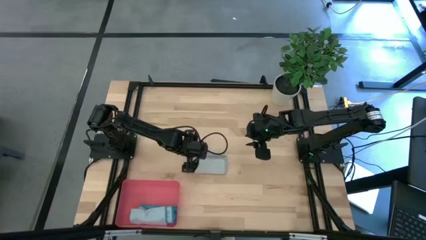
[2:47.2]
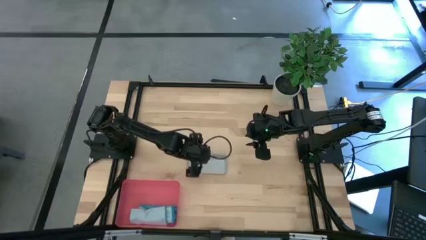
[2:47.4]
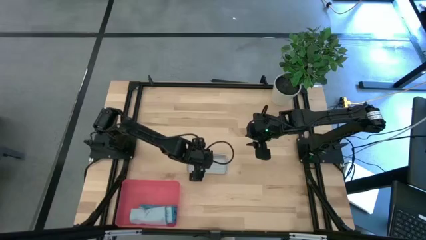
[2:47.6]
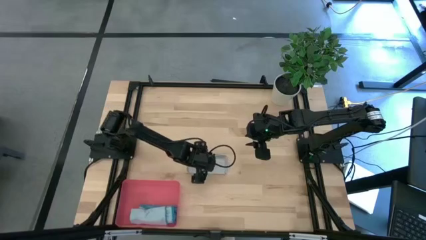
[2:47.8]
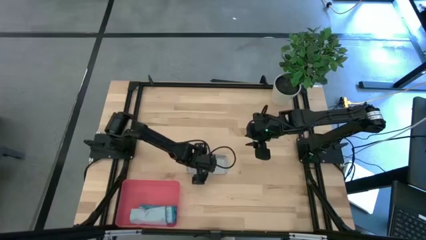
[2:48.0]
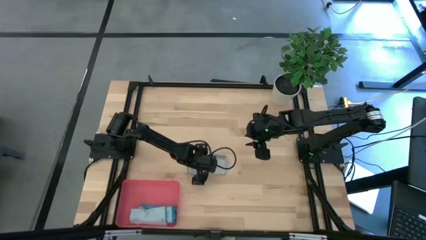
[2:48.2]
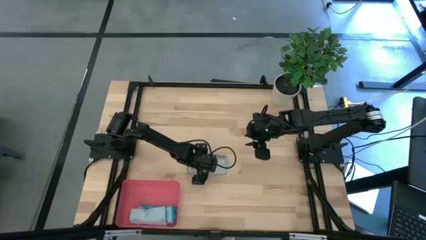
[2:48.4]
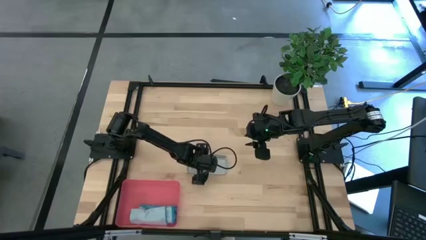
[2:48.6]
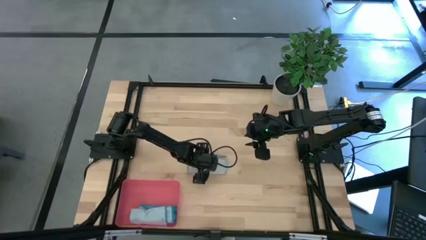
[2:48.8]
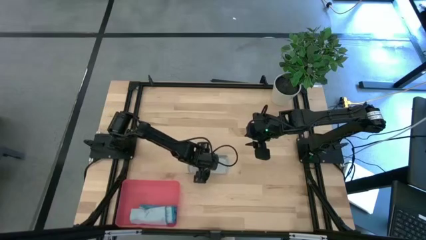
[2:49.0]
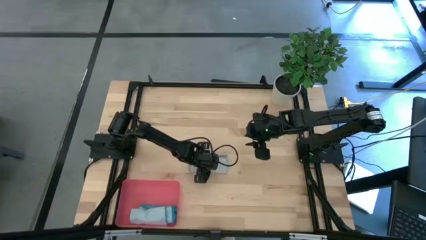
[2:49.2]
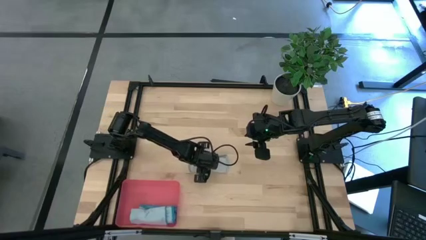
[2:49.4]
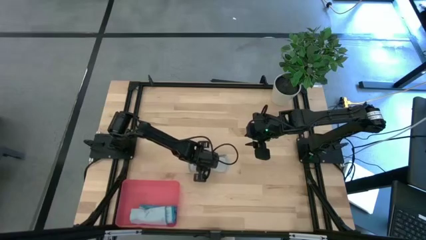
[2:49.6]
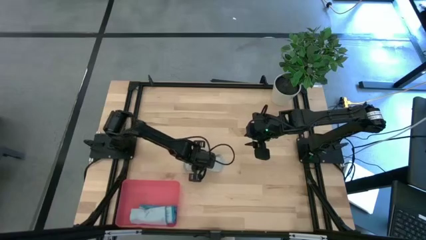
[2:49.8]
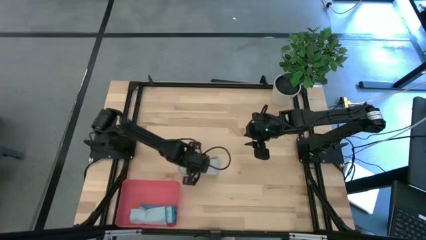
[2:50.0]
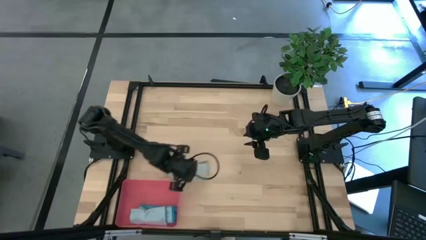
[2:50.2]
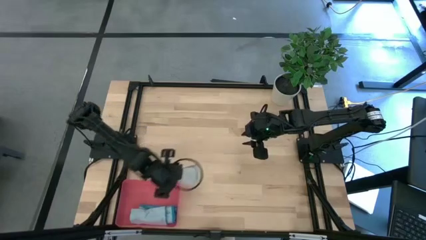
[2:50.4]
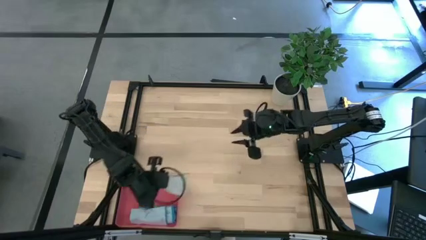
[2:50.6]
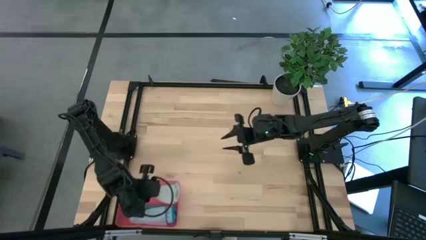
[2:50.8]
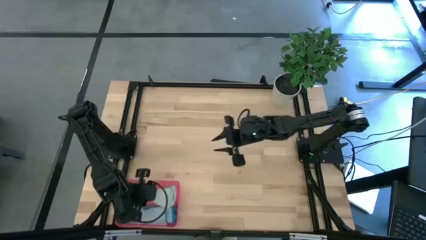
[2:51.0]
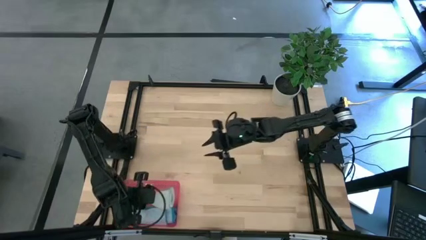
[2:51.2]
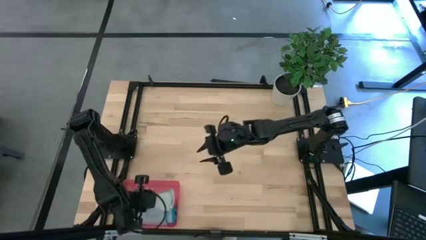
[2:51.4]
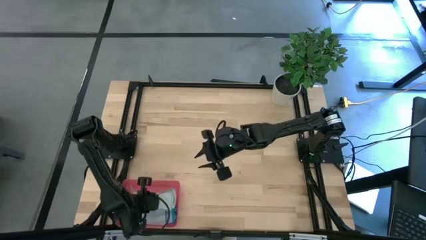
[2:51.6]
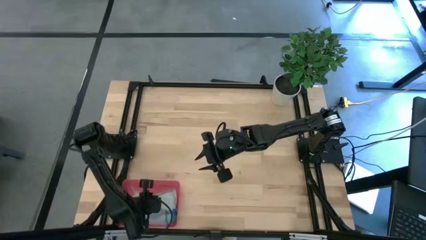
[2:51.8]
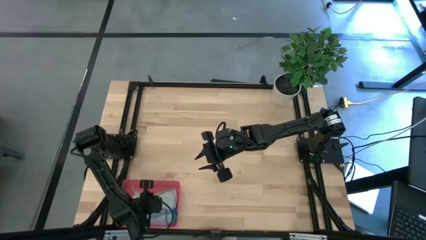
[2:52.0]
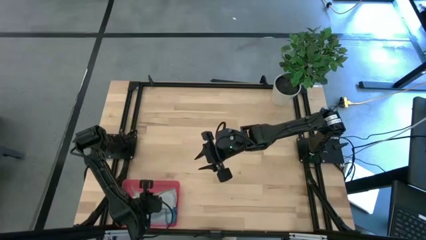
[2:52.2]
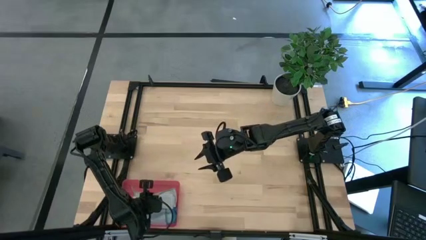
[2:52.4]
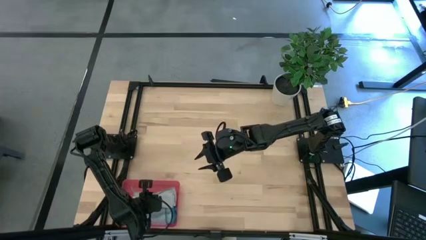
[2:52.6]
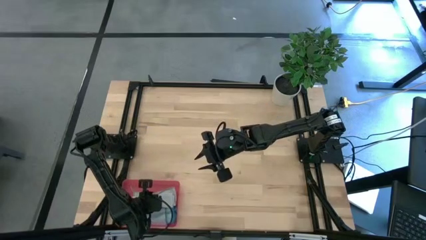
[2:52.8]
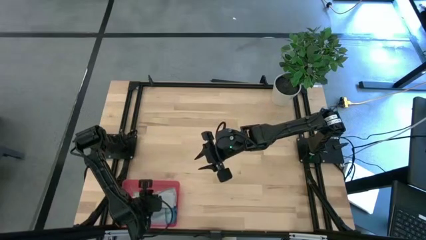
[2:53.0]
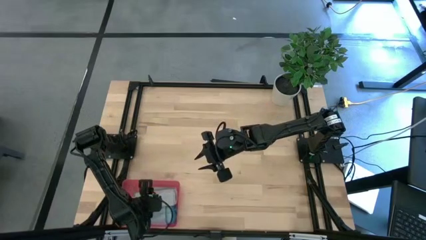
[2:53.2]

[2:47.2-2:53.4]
Task: Roll microfiber towels into tight, uniform cylinder then place into a basket
Put the rolled gray towel into the red bin

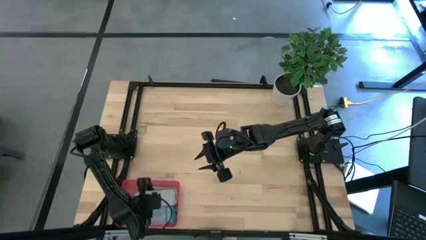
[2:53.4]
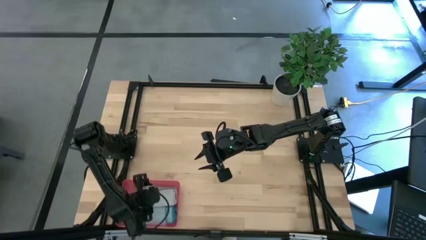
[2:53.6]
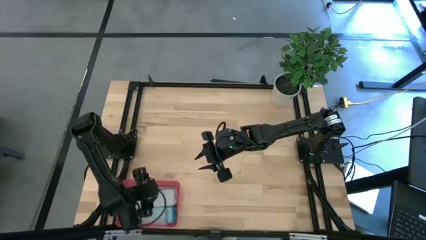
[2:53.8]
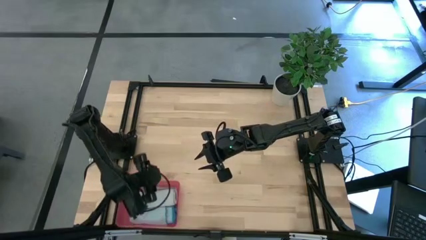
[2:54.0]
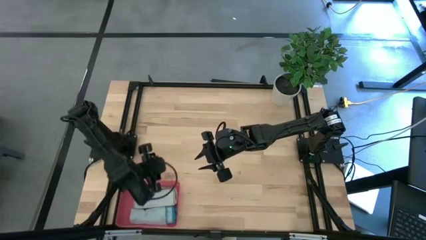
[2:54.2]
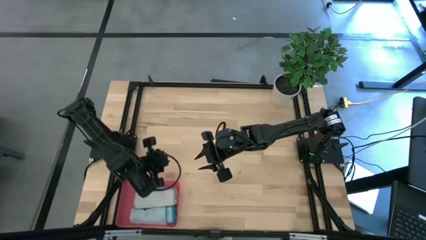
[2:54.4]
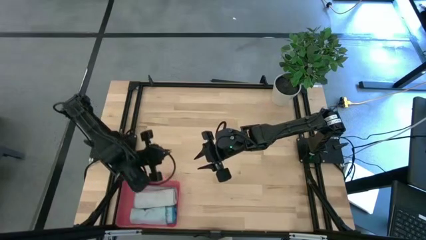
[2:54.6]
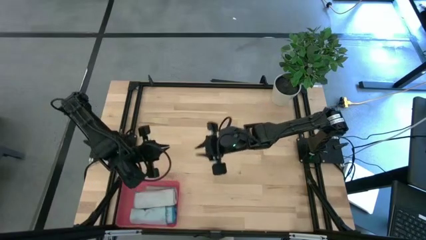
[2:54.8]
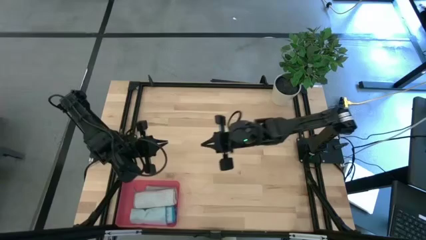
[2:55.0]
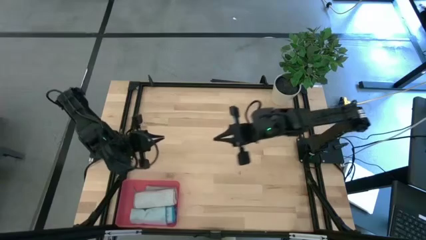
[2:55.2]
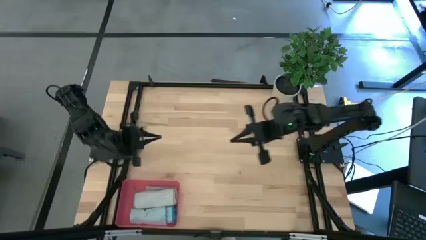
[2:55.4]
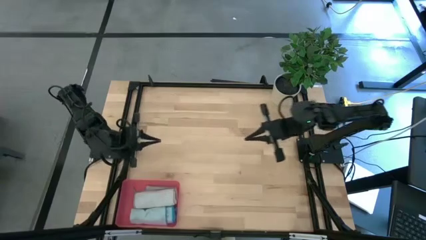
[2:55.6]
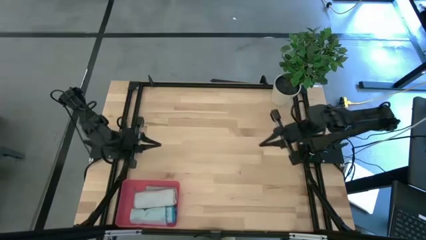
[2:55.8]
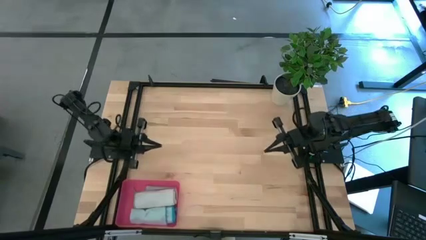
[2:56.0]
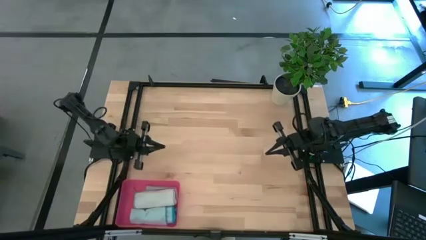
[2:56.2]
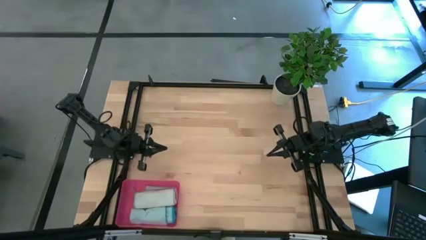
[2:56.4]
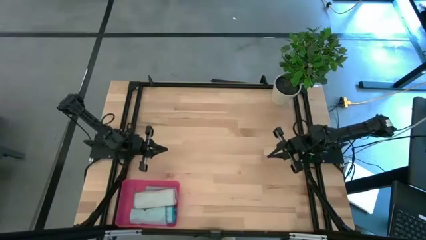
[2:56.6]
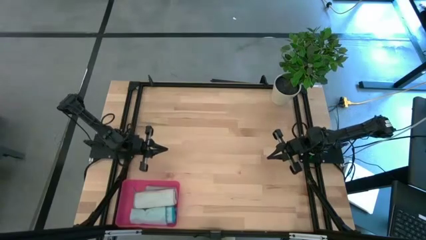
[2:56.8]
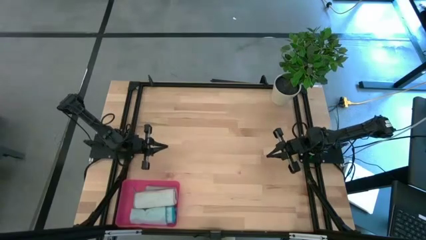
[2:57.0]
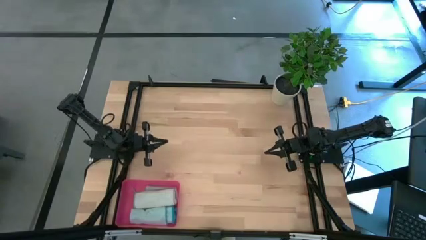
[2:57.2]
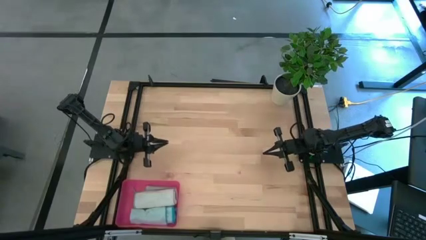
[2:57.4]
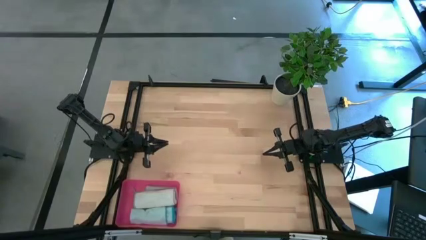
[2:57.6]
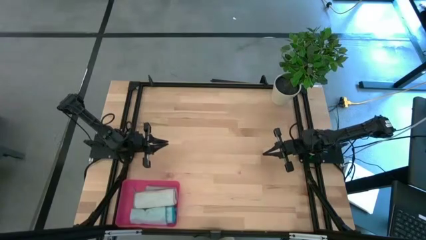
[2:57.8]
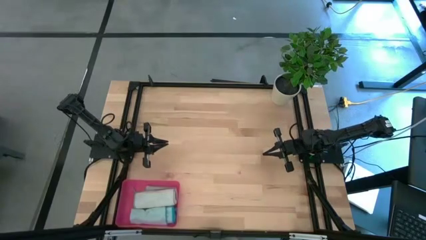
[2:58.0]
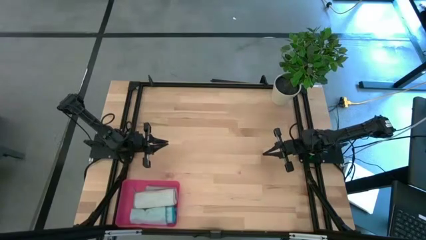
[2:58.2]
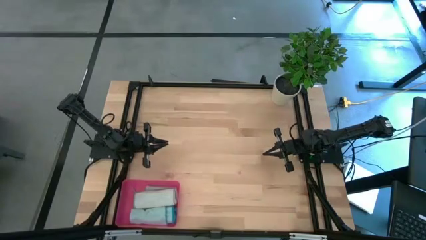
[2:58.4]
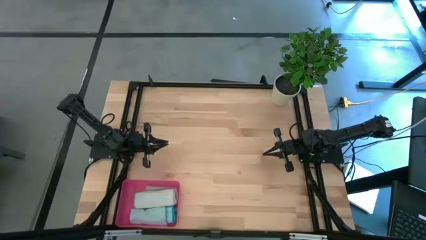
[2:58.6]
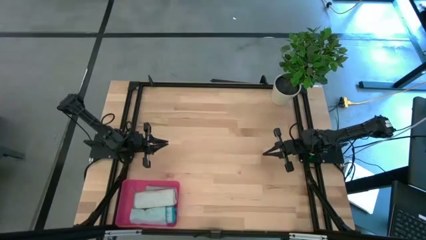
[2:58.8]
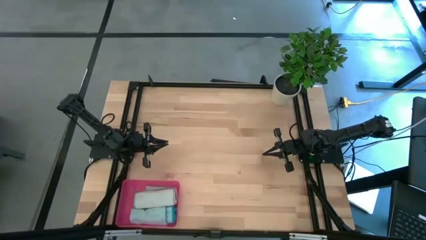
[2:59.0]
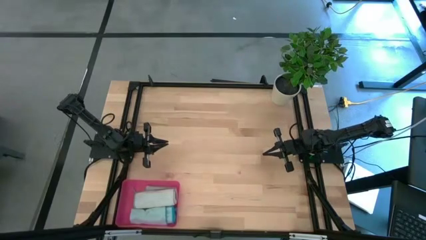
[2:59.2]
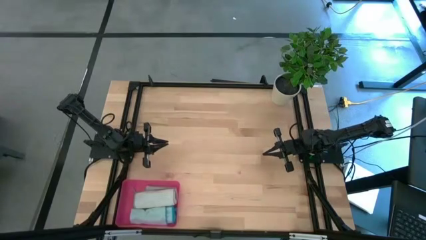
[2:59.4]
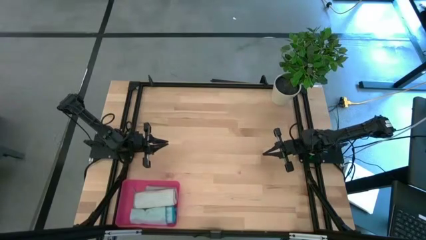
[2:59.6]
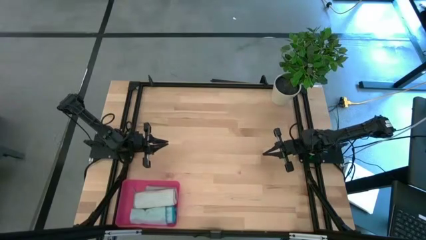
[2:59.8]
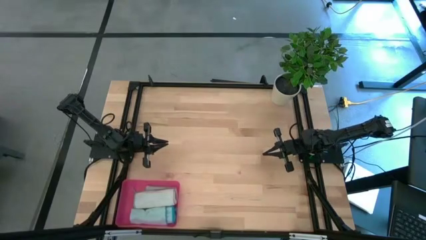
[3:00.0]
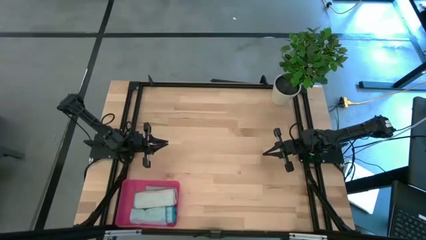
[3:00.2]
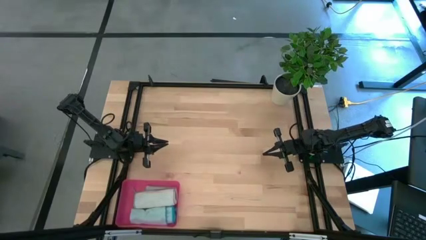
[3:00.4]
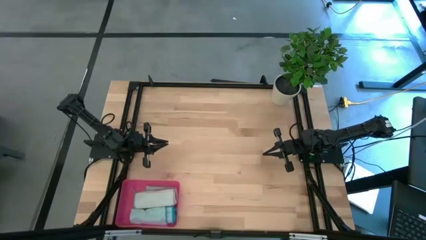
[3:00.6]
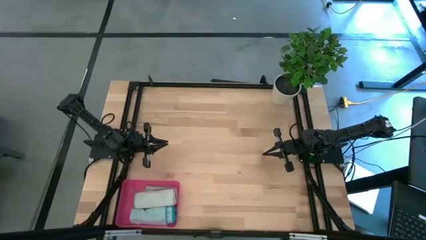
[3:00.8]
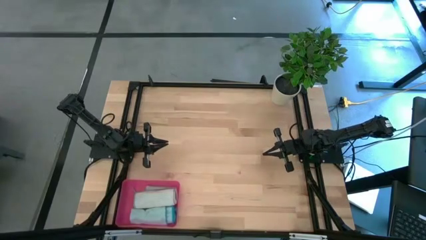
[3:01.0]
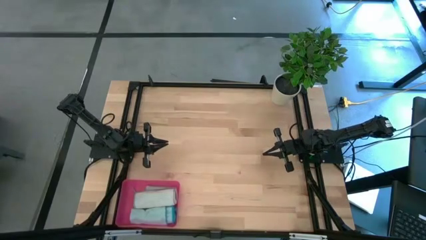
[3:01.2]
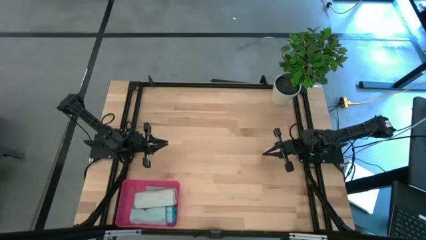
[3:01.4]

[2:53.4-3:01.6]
Return to Home Position
